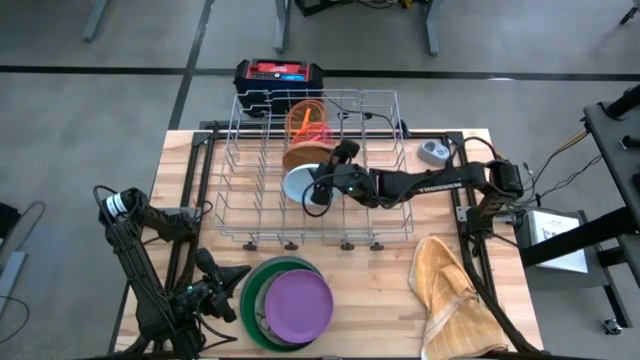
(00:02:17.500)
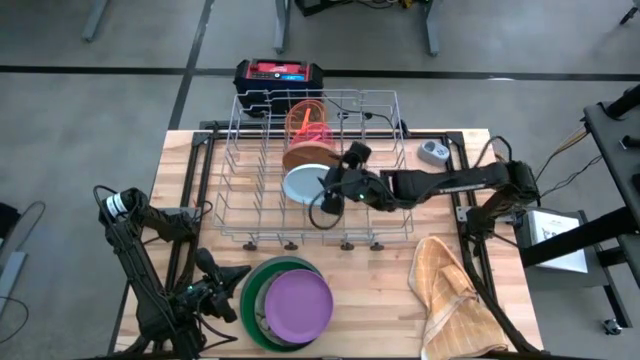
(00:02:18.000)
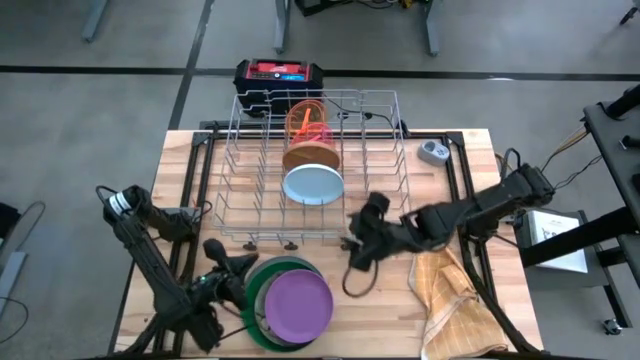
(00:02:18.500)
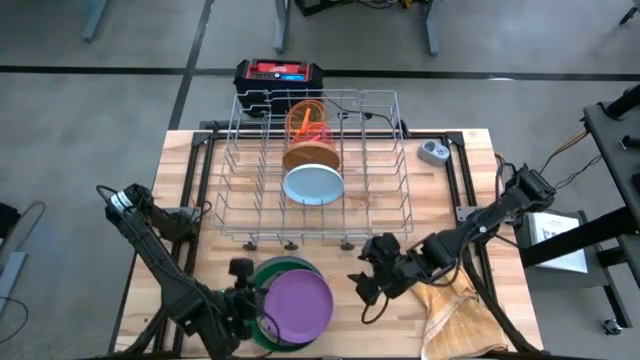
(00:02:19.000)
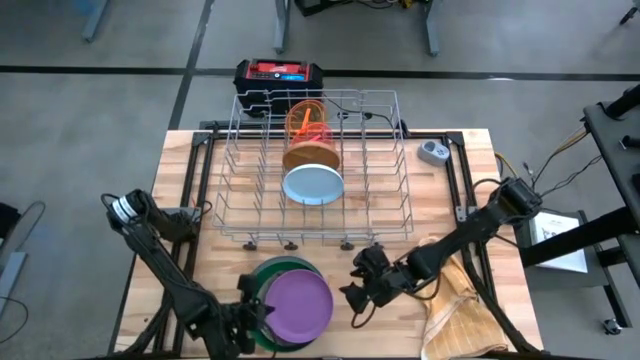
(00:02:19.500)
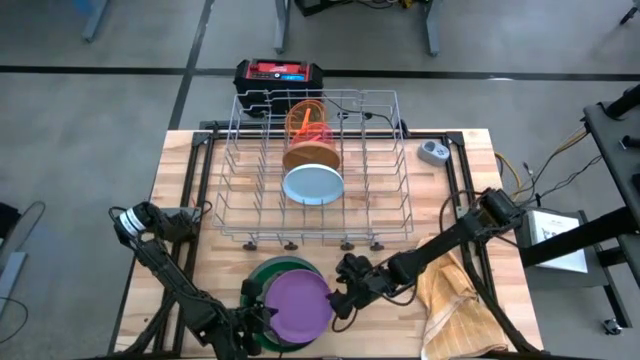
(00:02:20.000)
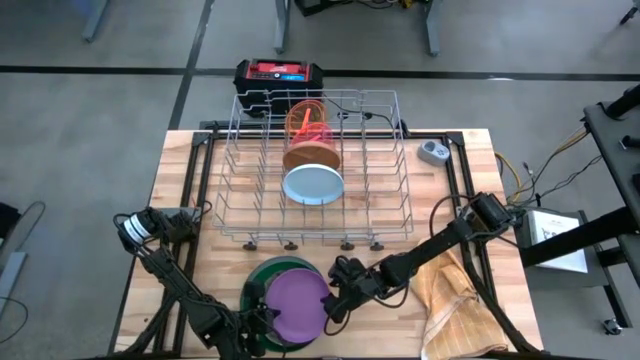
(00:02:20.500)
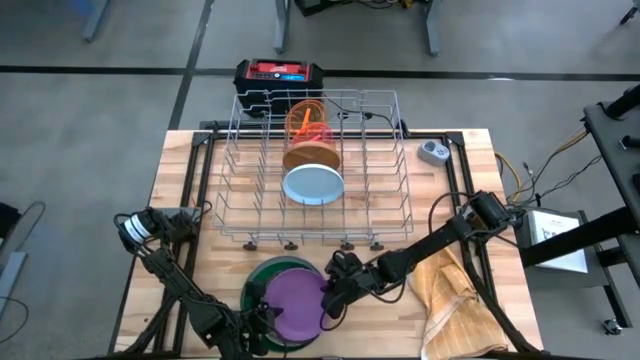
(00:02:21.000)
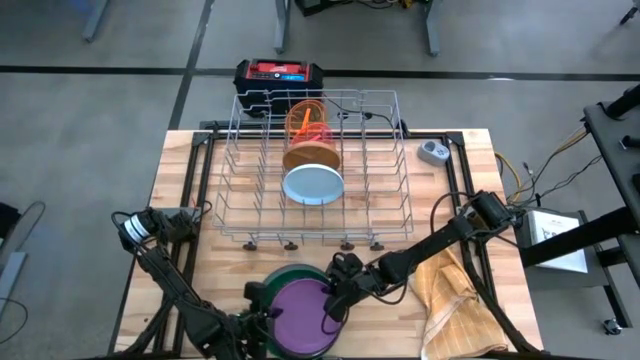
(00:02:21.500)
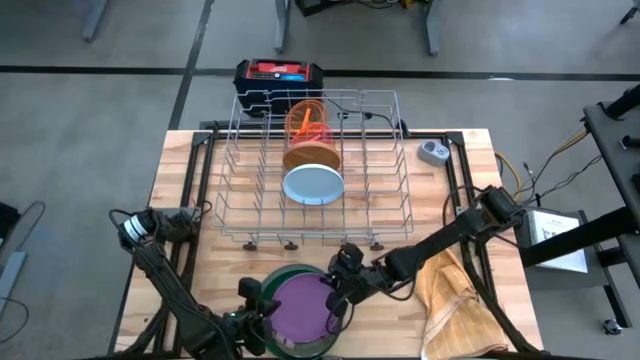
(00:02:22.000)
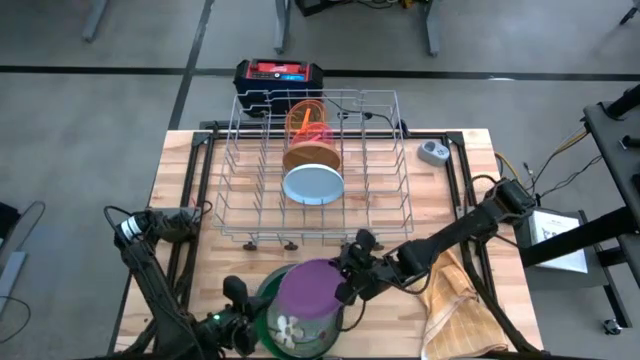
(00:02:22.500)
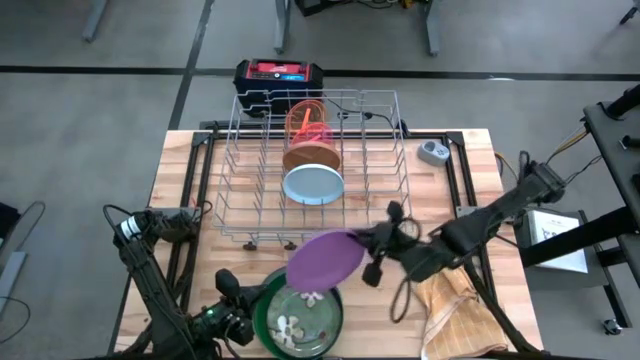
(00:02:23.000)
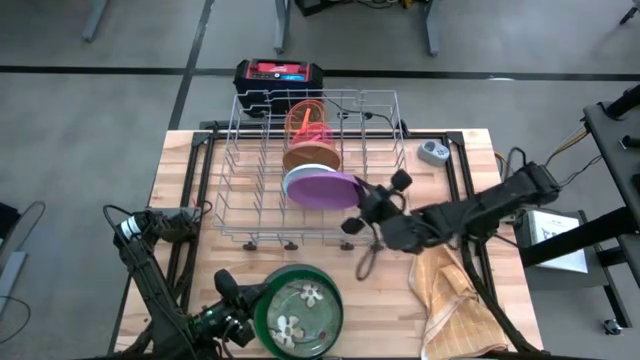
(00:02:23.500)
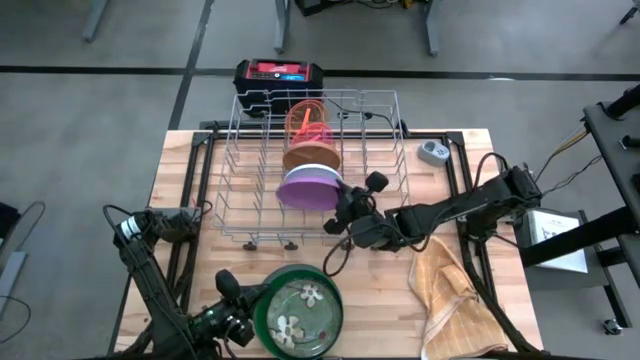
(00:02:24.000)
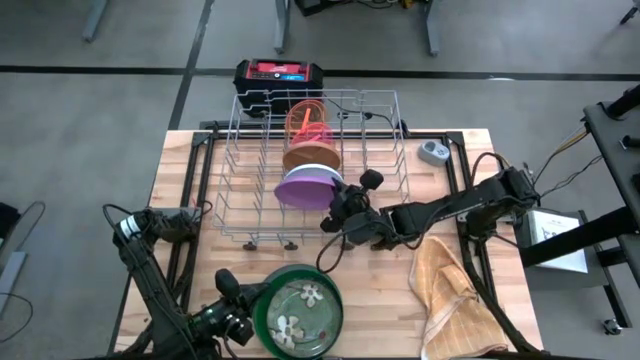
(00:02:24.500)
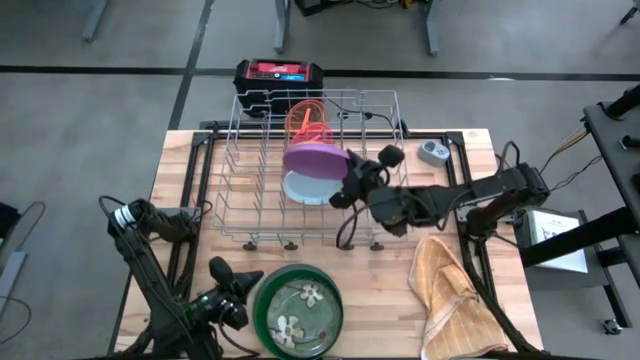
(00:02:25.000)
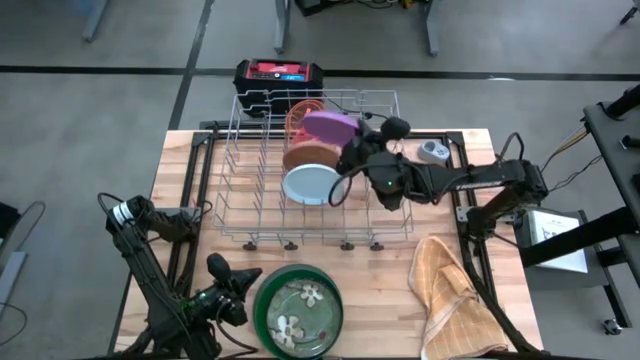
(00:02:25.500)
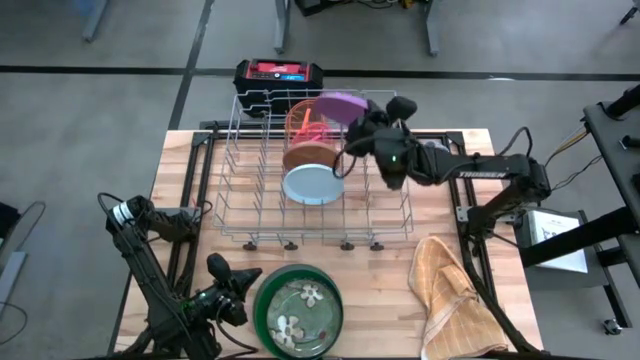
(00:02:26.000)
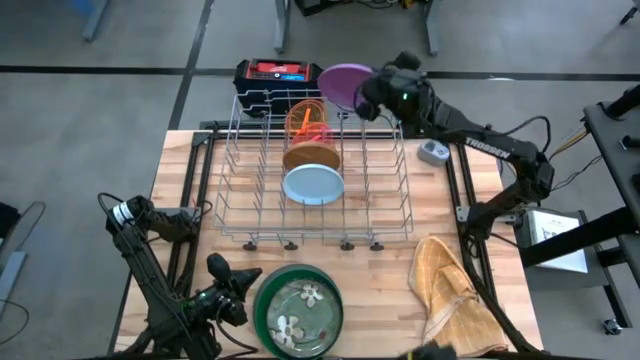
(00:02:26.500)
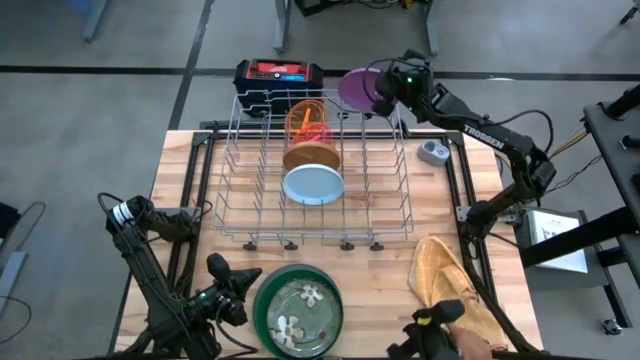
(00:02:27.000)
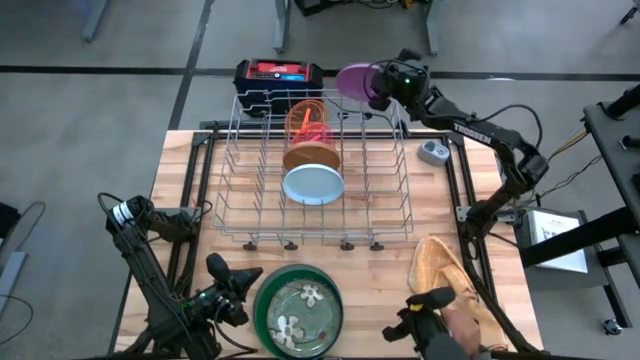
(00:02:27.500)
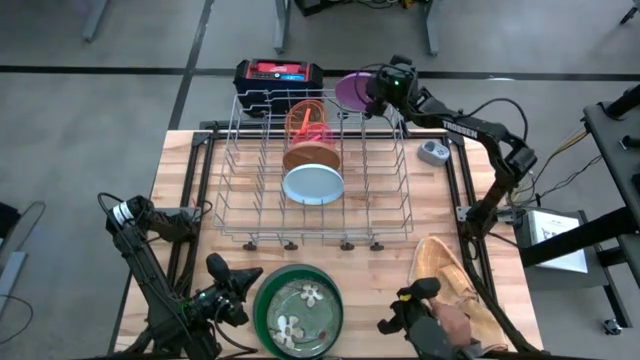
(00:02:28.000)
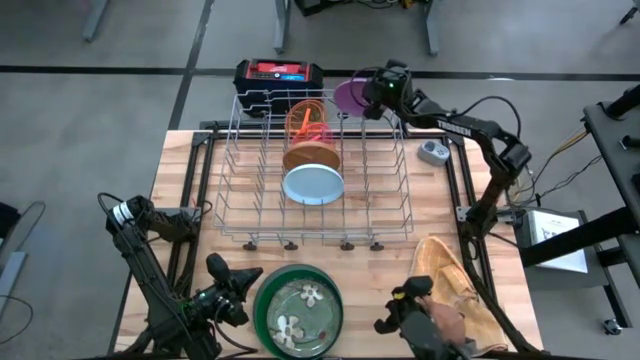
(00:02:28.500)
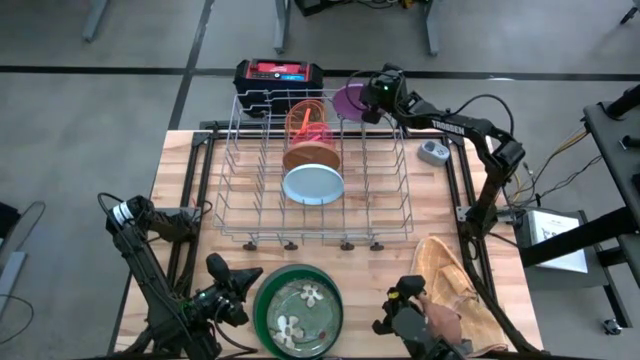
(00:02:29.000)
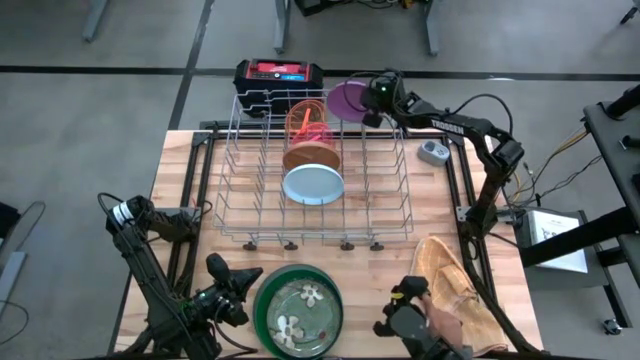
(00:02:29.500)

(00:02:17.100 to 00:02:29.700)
Task: Sort dishes
Put the purple plate into the dish rack

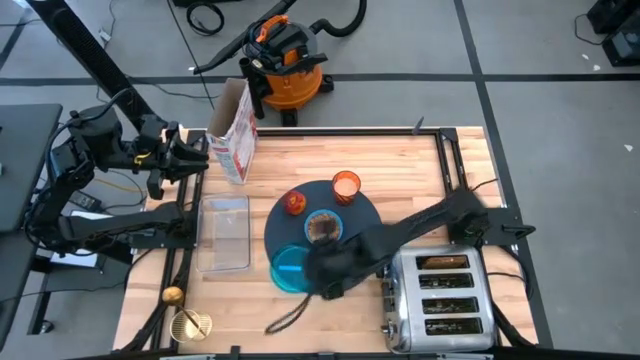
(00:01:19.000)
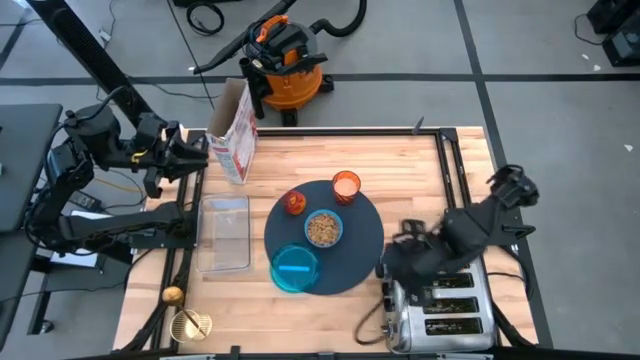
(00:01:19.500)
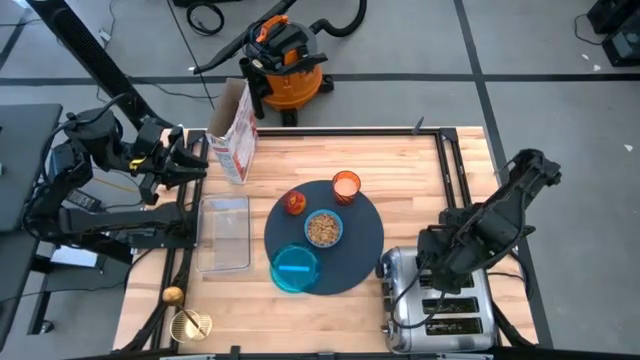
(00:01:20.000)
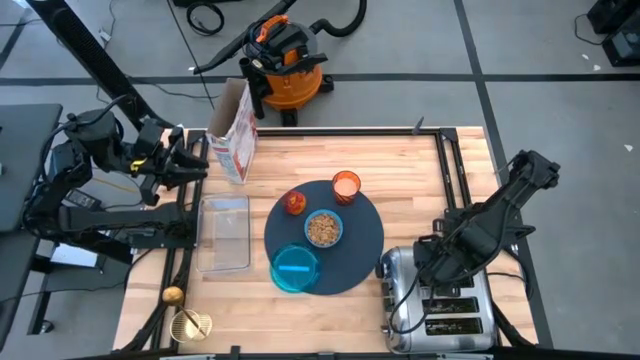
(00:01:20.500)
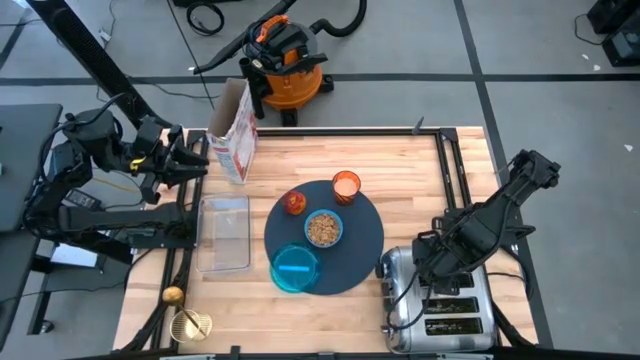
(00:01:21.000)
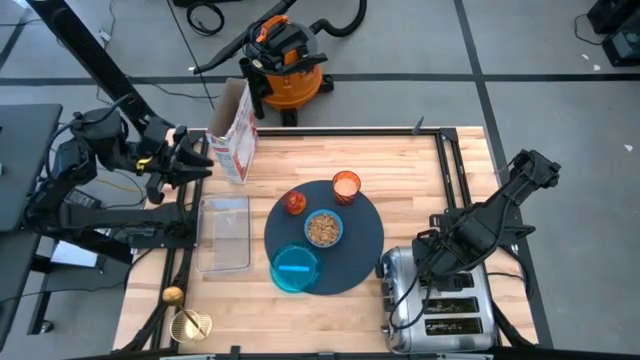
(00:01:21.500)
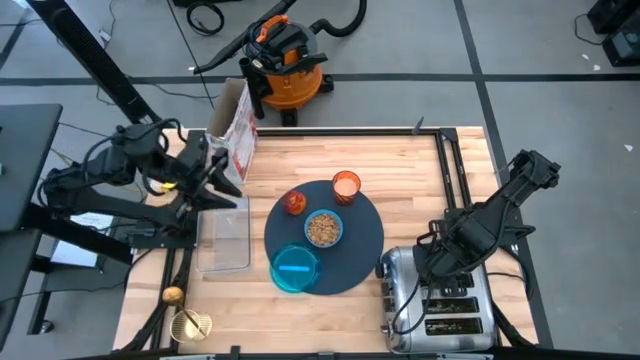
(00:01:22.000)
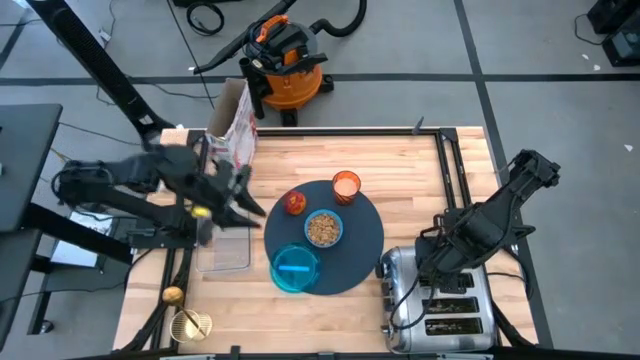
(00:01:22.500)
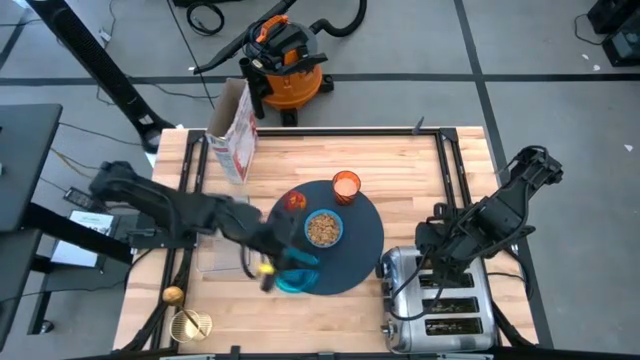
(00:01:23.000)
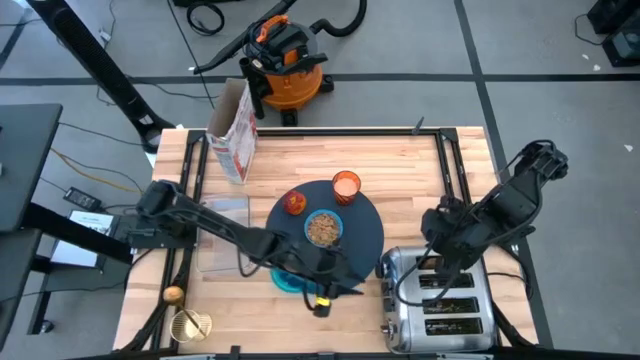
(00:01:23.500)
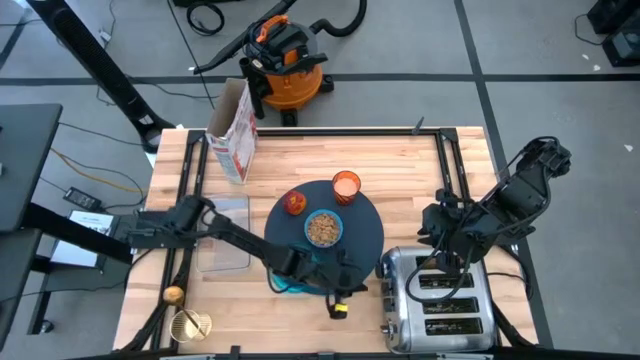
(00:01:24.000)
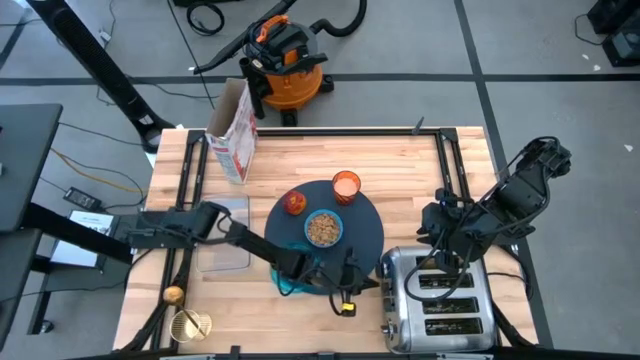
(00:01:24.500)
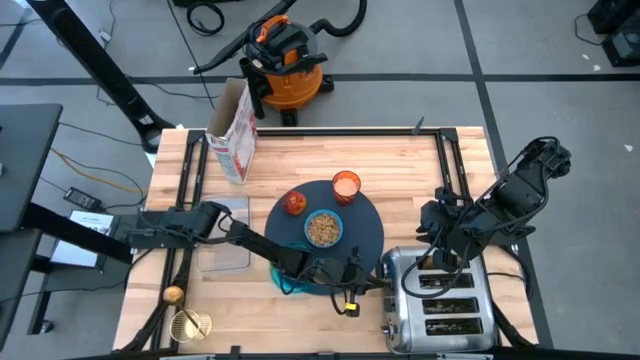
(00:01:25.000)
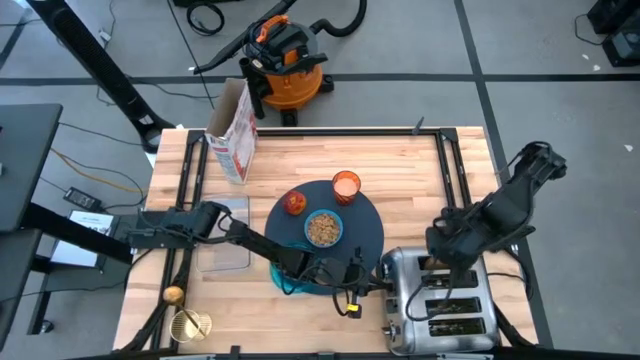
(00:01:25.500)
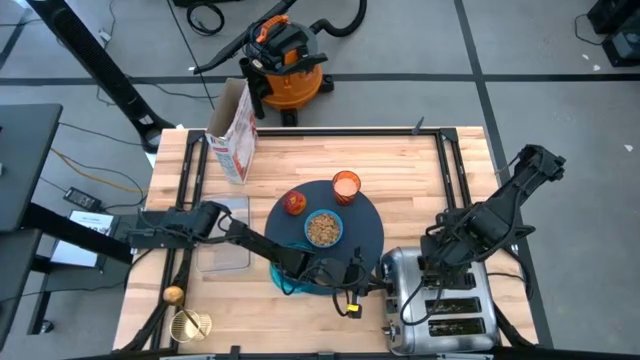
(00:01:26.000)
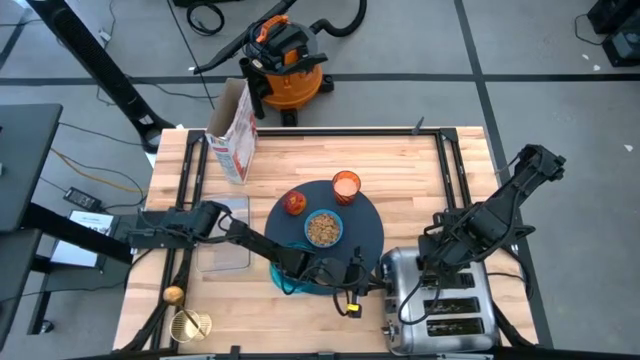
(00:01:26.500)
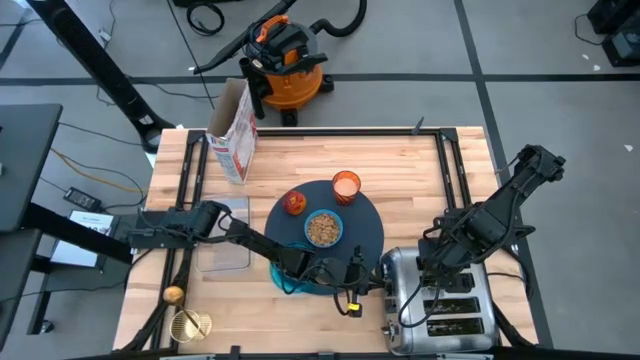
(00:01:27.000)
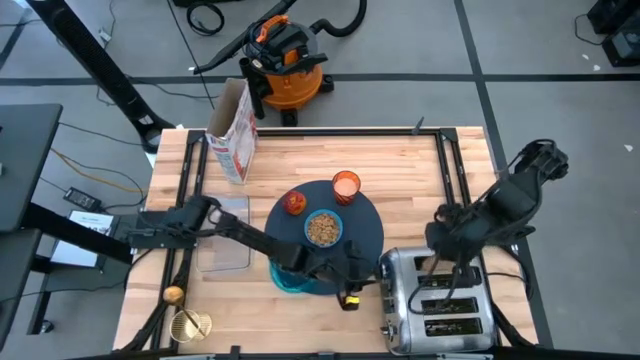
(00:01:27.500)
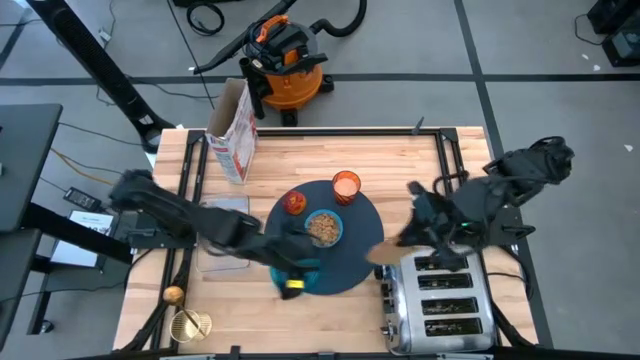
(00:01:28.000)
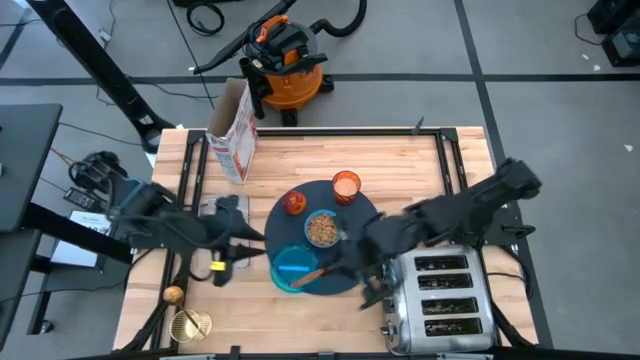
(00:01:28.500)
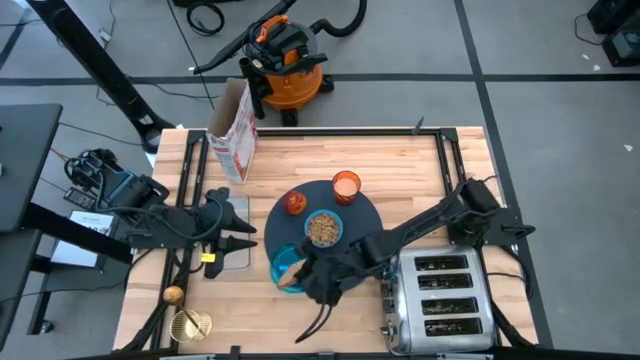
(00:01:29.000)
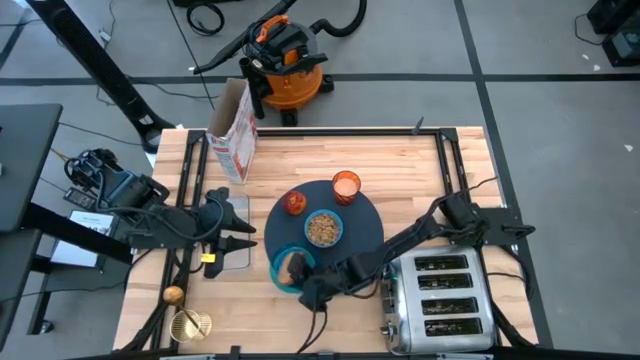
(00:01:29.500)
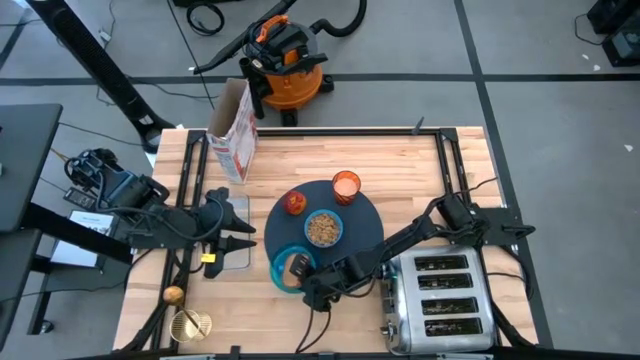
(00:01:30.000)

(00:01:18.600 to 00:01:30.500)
Task: Arrange a breakfast setting
Put the toasted bread on the blue transparent plate
